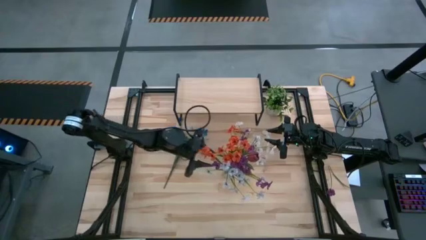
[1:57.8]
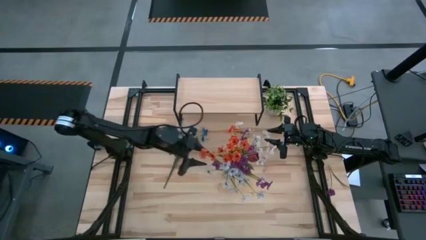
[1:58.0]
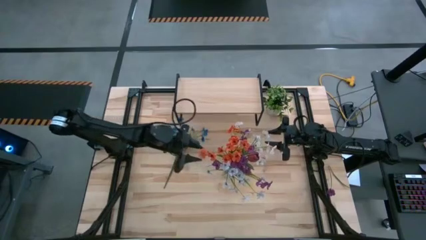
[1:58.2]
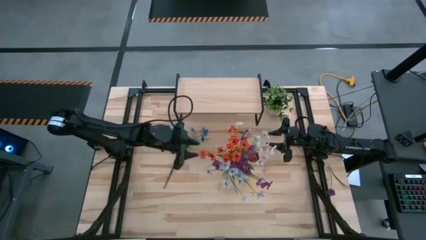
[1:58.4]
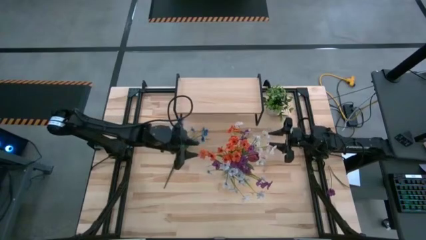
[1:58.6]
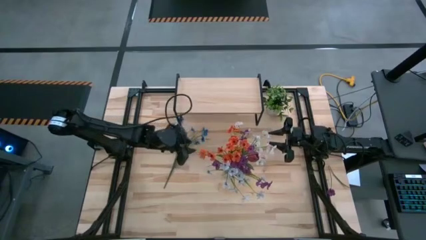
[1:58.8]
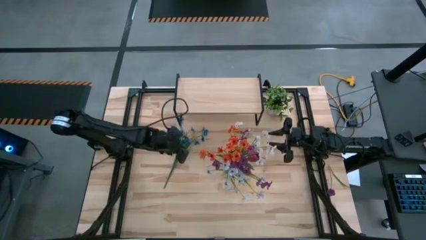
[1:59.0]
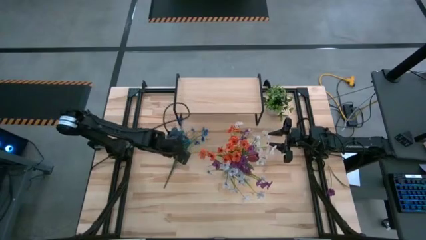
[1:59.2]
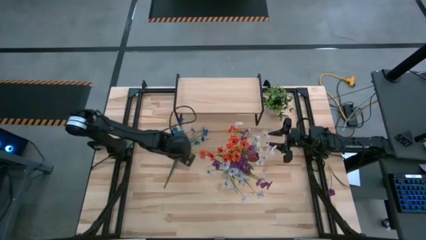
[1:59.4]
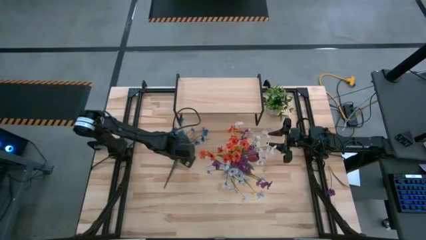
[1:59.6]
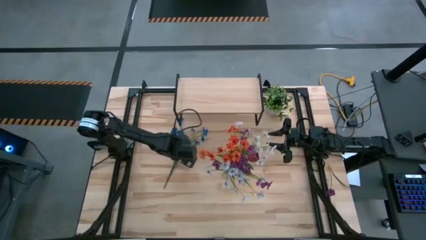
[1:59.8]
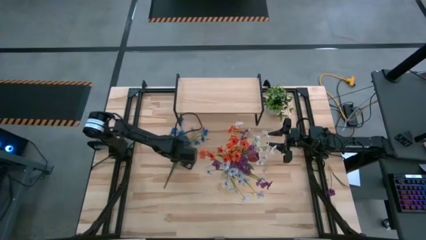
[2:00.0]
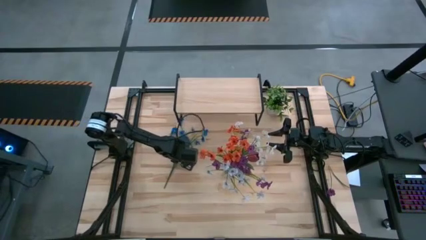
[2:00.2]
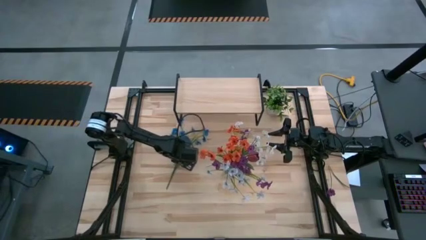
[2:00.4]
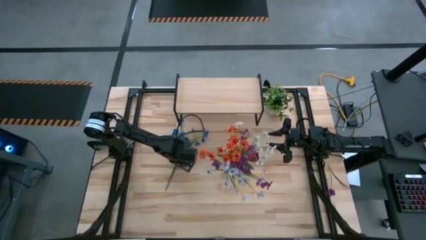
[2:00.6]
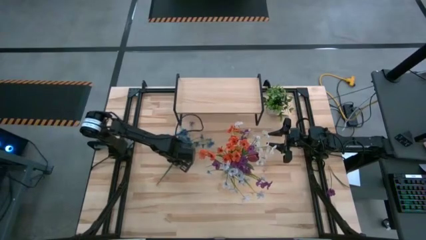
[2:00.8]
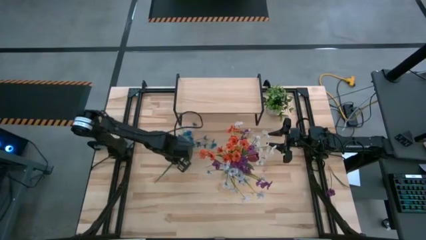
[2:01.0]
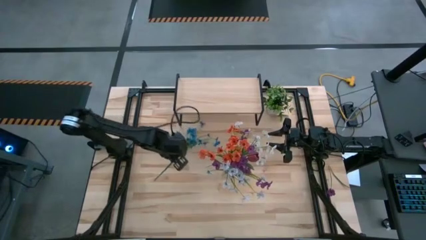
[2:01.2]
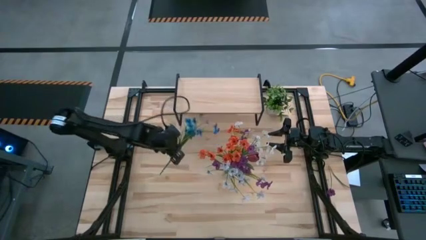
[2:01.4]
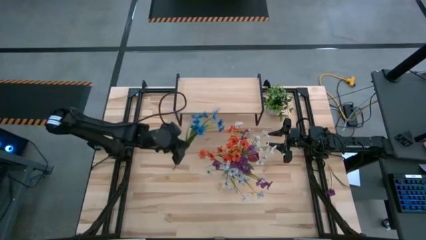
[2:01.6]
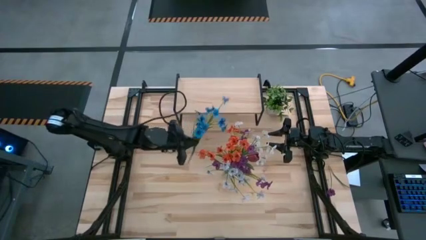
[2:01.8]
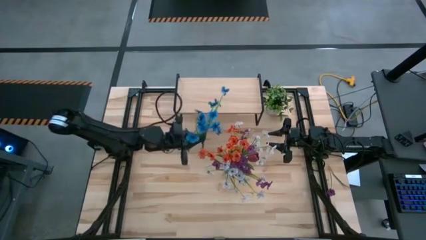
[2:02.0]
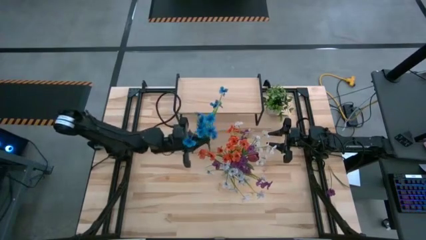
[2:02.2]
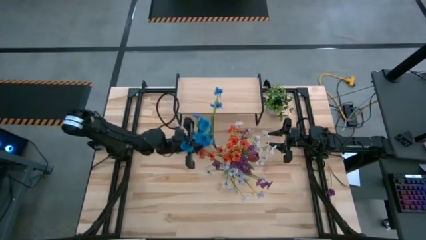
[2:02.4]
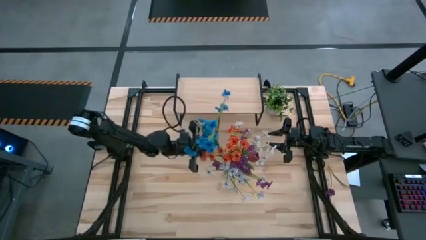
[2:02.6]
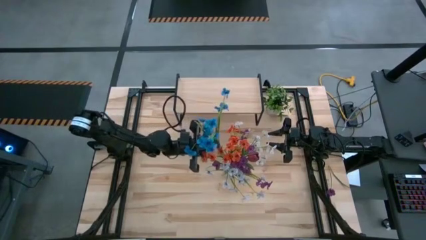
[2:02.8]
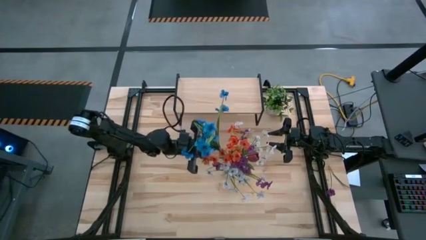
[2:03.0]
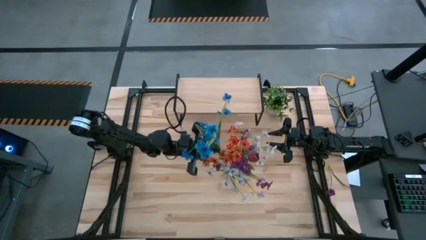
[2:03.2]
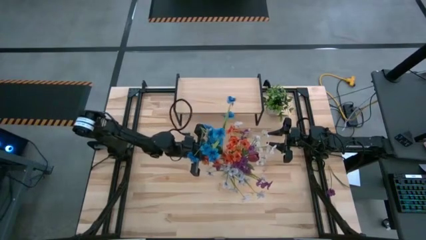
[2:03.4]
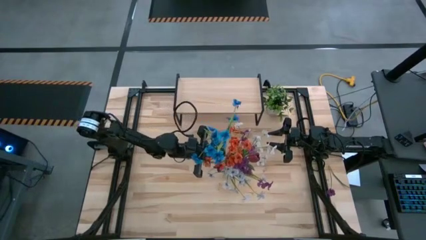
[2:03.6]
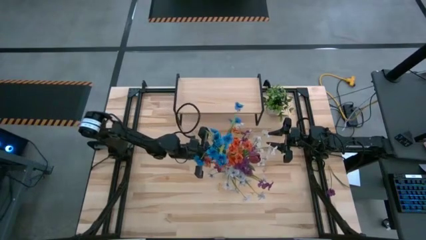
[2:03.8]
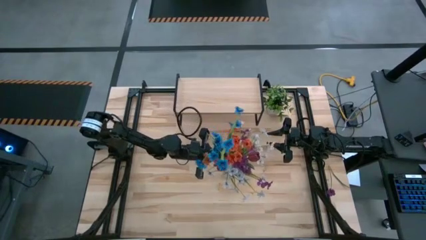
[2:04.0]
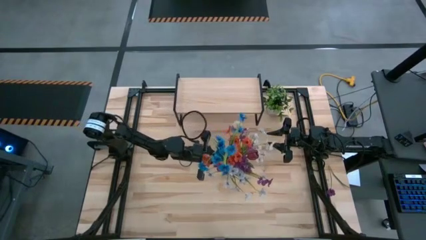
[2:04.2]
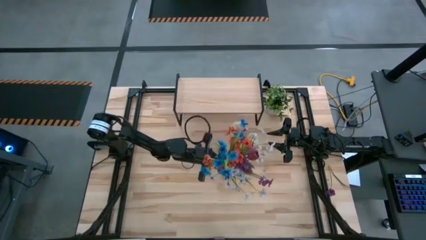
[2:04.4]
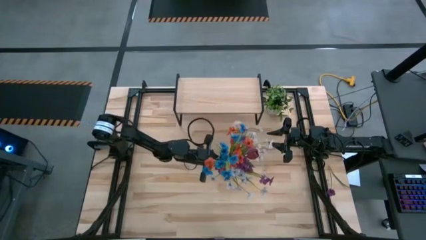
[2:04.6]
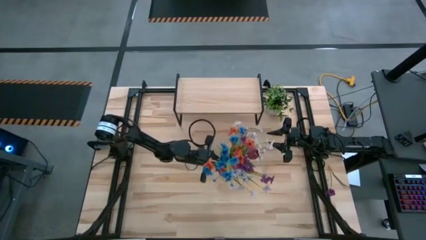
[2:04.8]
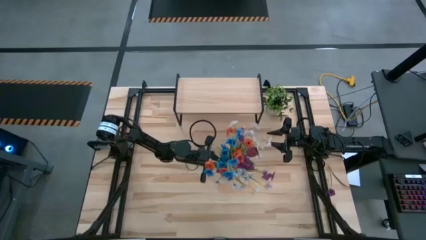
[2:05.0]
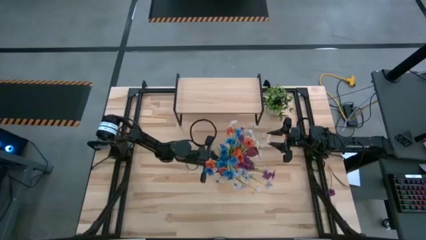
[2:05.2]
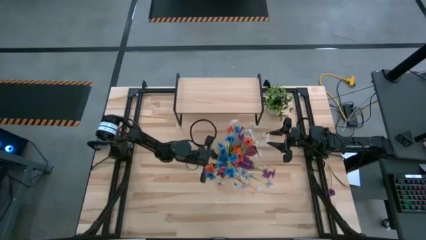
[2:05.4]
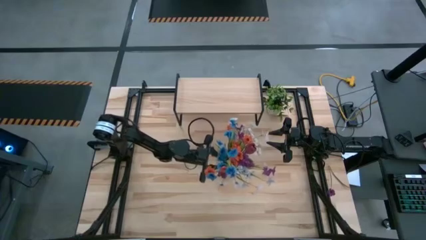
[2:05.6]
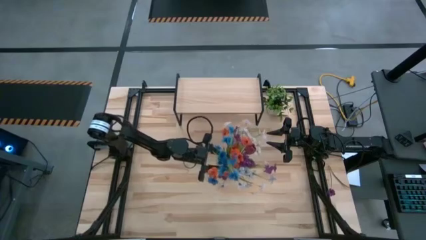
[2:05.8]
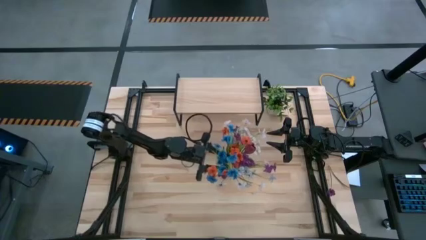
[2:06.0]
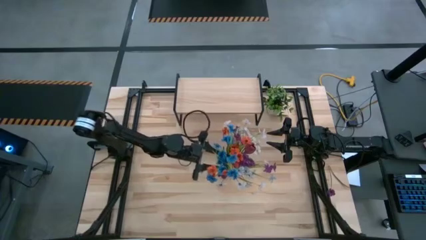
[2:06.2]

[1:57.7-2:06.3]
Task: Pick and place flowers into a vace then onto a shelf
Put the blue flowers into the transparent vase

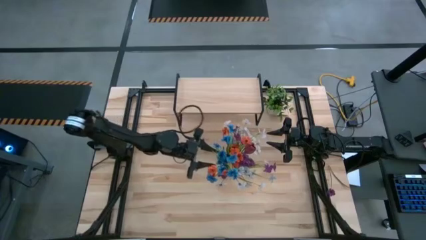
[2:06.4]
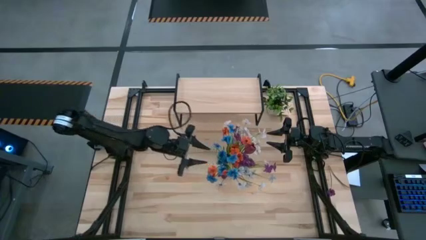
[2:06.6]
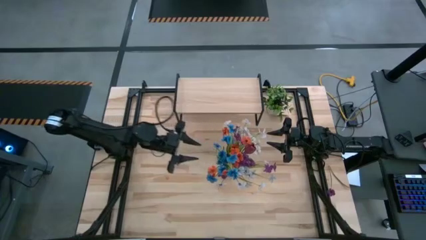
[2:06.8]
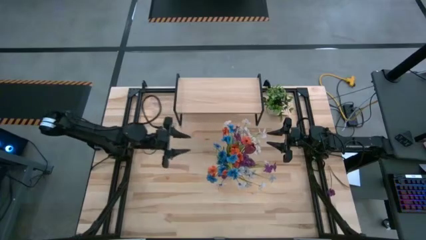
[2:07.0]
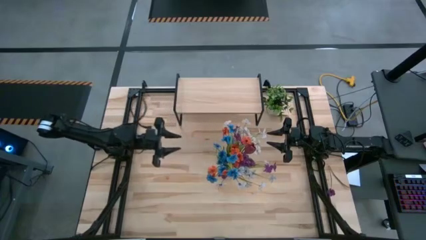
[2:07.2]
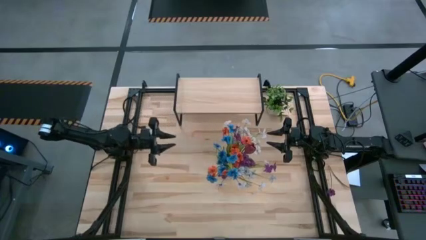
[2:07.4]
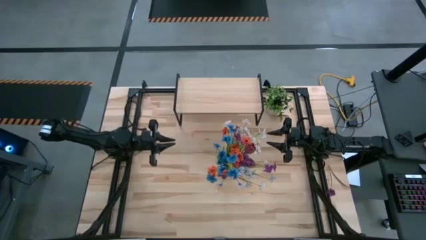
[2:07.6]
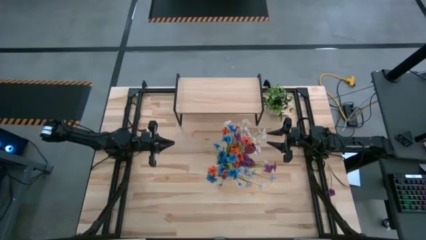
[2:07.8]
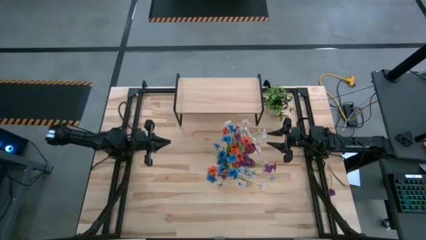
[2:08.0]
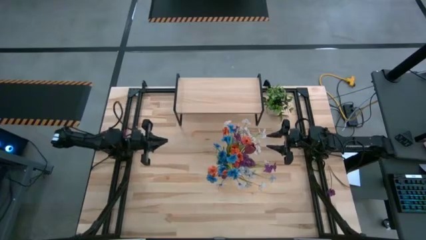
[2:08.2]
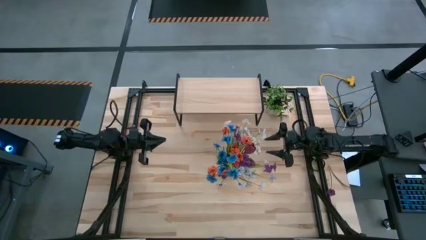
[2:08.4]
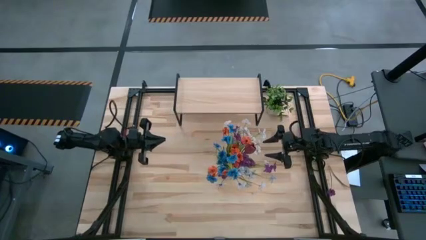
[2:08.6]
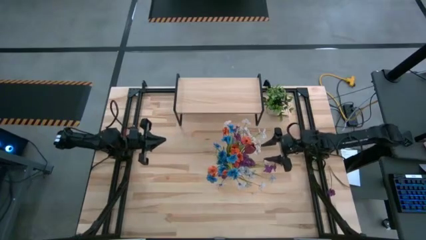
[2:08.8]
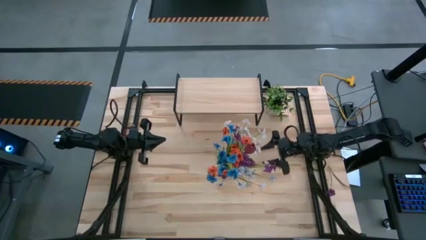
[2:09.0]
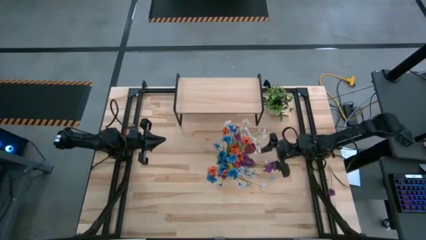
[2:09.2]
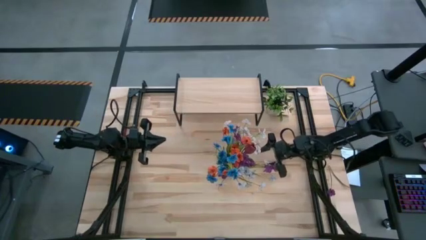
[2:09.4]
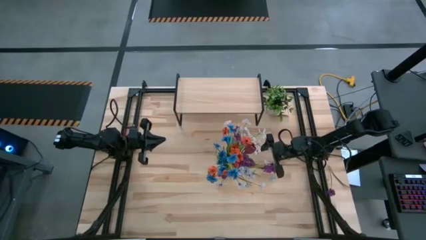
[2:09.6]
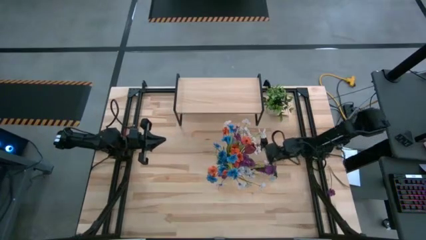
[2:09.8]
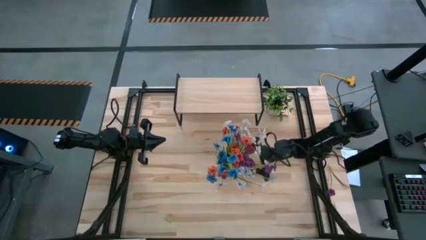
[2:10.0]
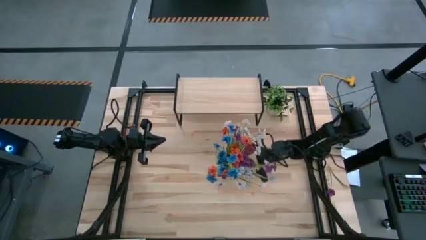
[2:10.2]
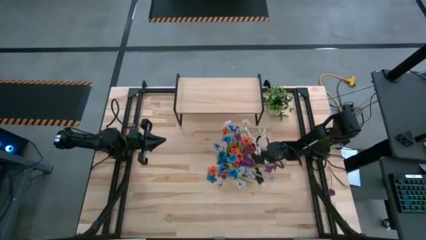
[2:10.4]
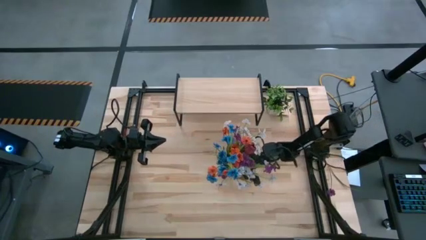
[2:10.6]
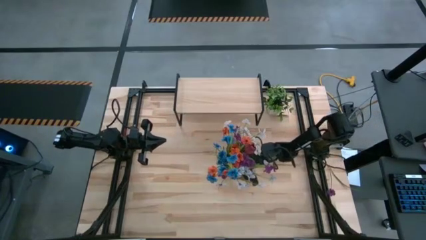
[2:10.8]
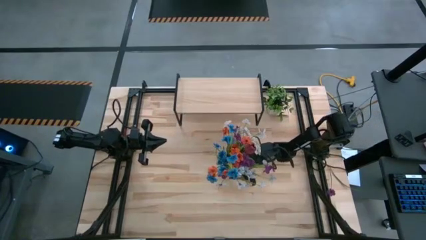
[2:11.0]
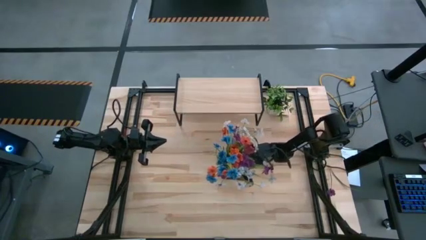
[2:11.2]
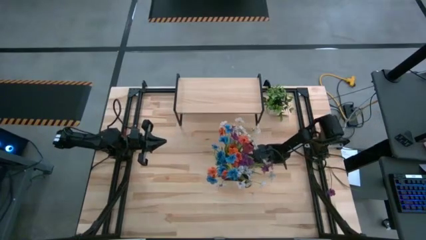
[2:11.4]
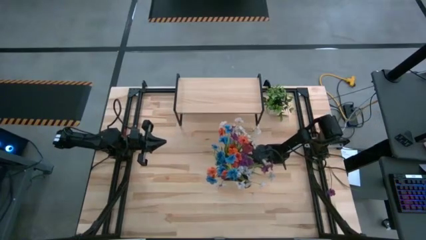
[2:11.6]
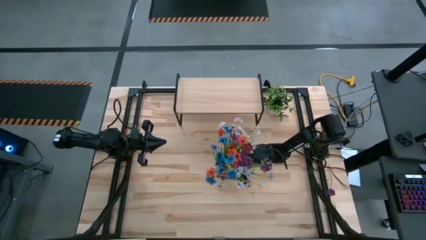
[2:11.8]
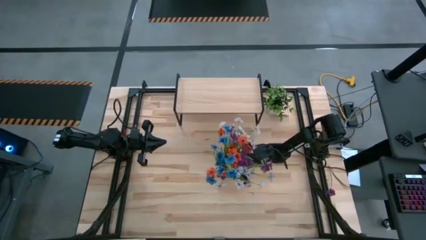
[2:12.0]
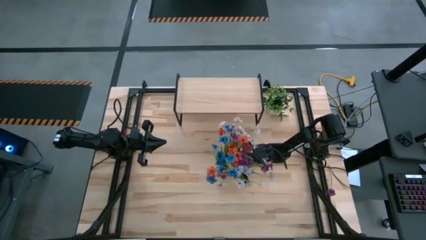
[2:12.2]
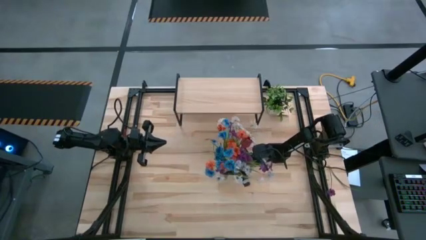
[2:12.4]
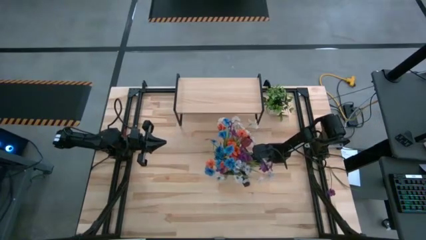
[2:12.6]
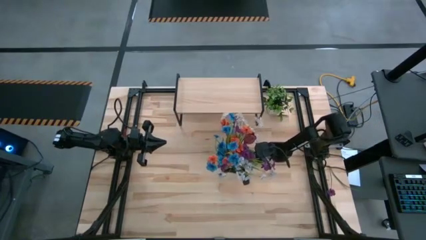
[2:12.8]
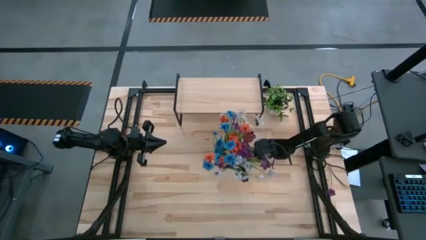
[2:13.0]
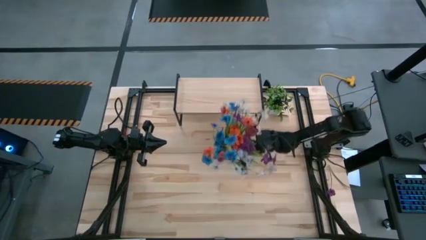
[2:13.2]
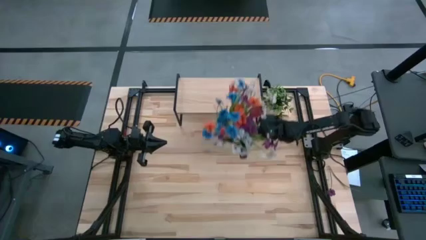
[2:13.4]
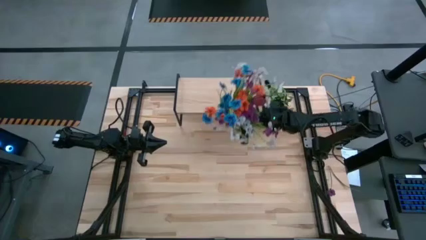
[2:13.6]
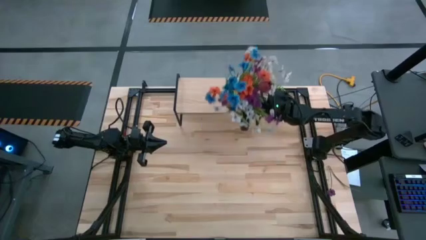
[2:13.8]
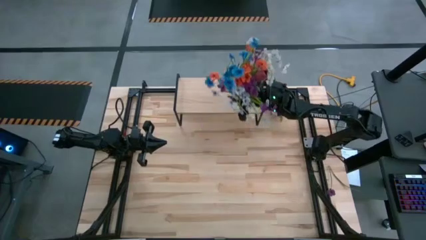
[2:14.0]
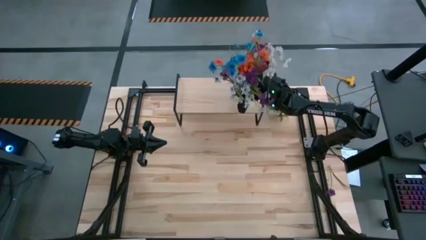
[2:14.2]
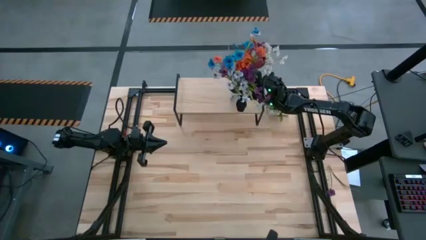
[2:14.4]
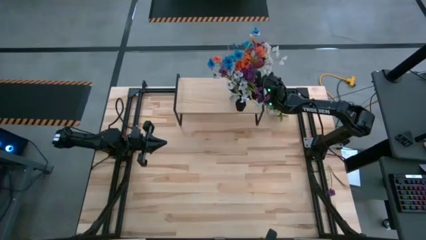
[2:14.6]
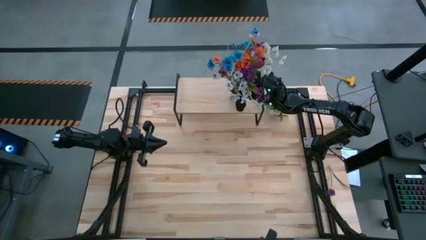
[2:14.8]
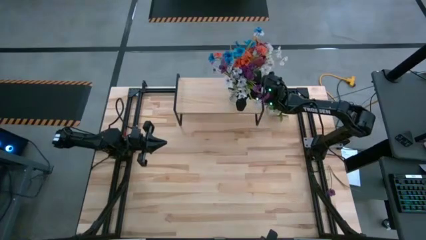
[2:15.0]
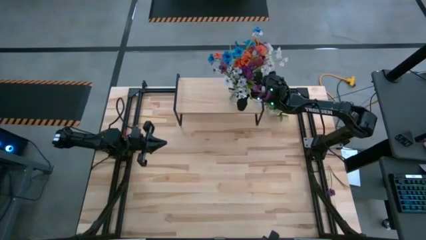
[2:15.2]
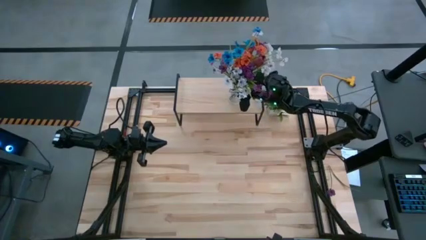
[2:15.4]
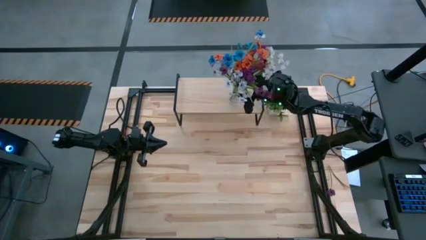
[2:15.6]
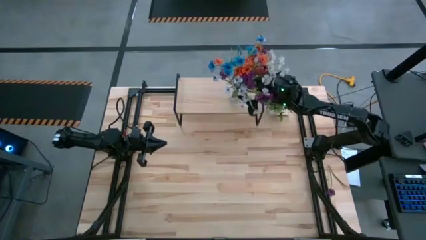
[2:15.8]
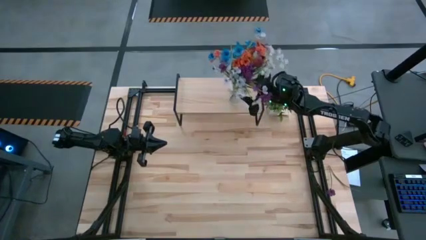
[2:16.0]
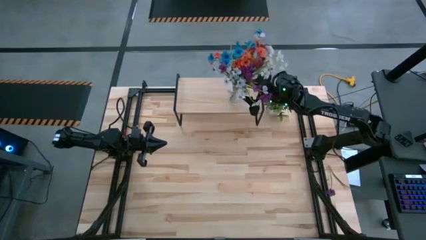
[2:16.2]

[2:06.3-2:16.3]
Put the transparent vase on the shelf
